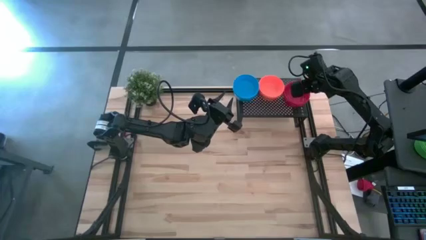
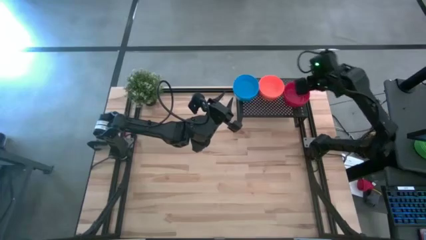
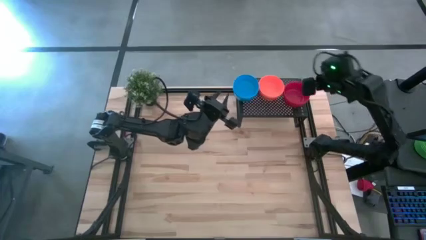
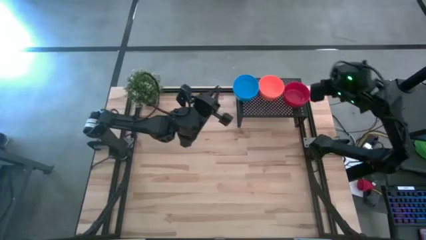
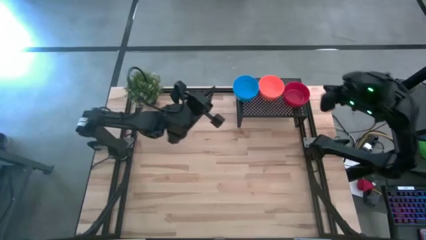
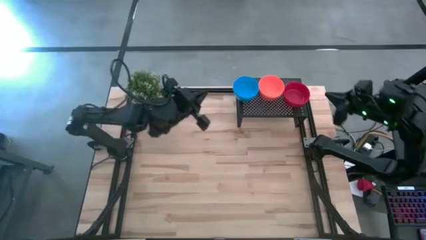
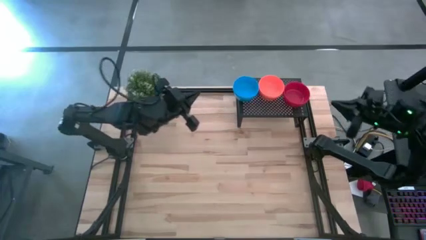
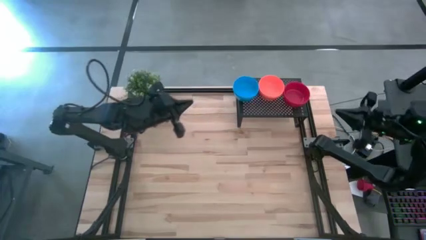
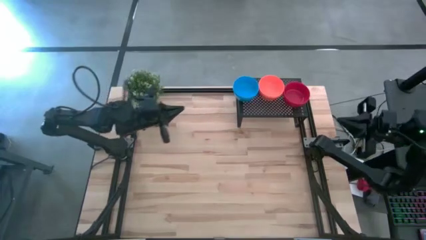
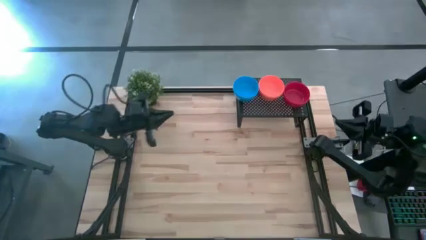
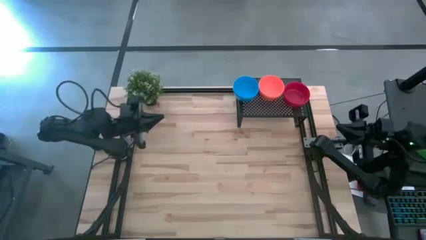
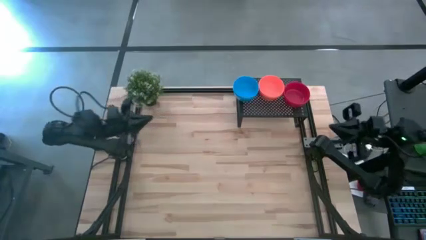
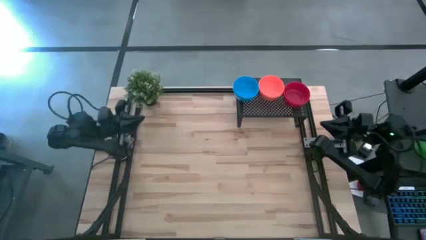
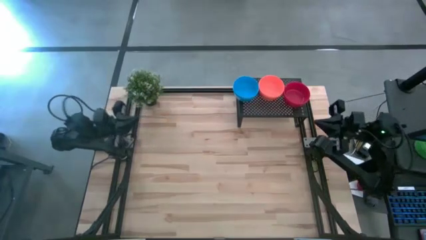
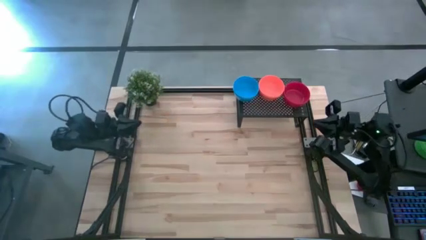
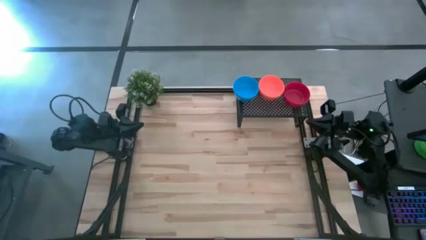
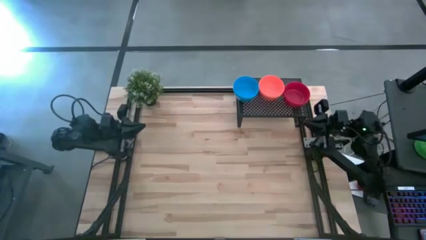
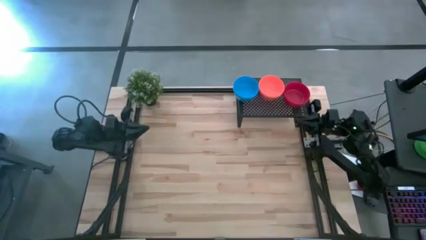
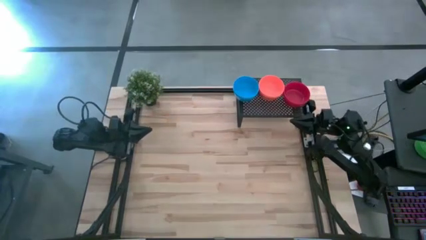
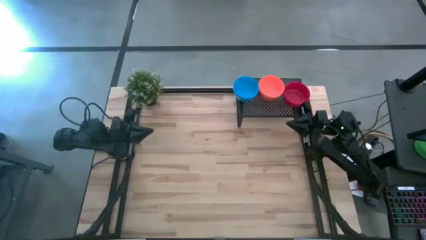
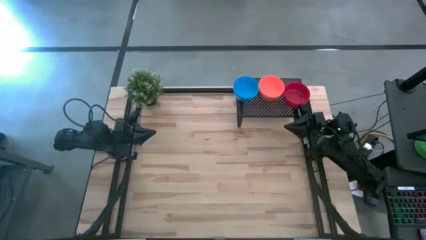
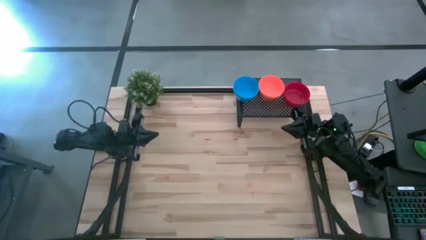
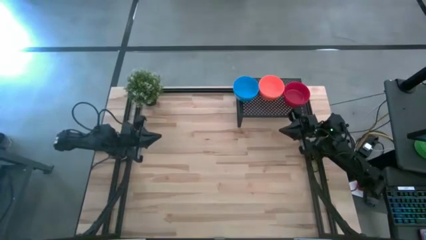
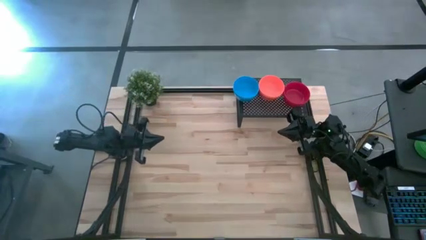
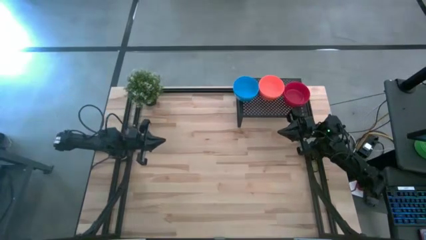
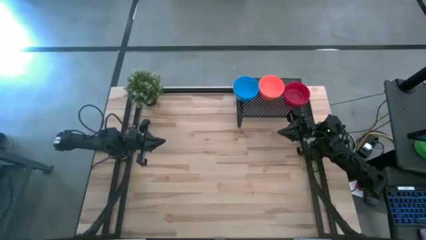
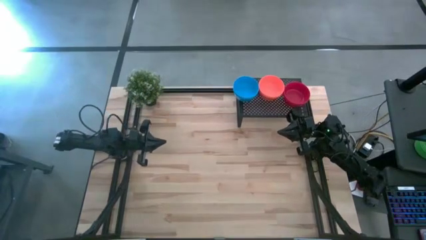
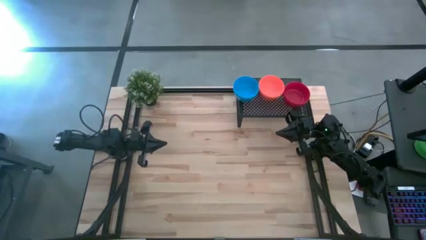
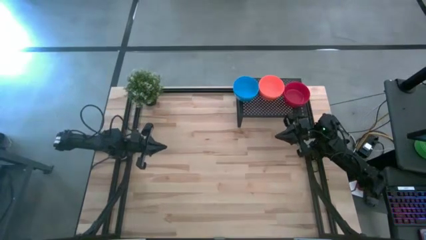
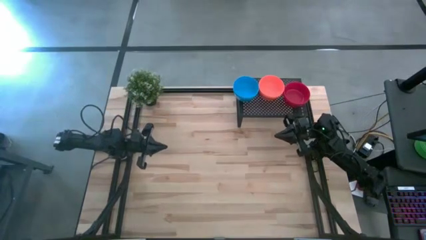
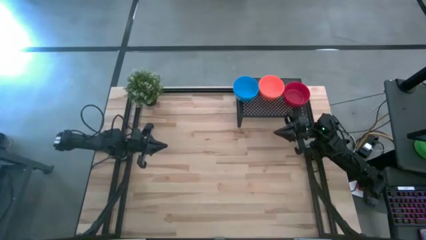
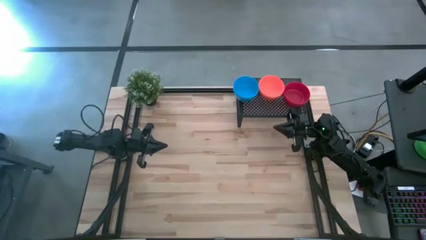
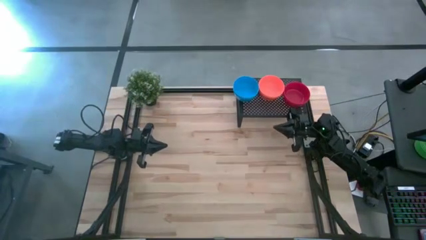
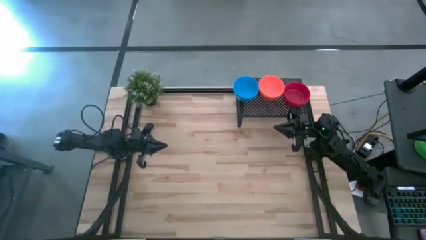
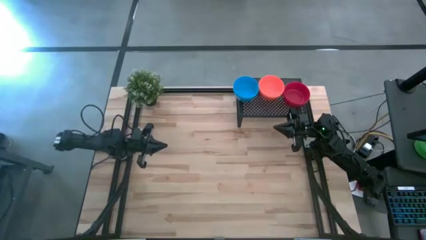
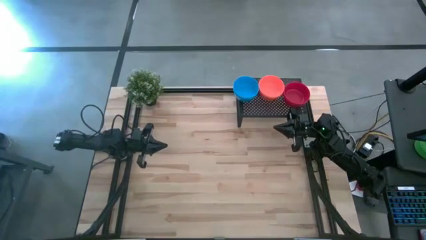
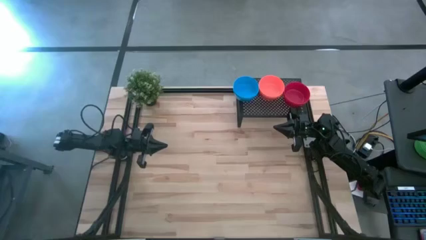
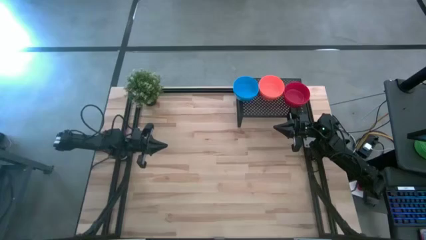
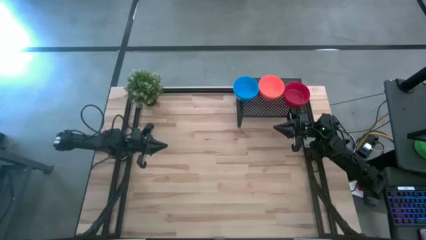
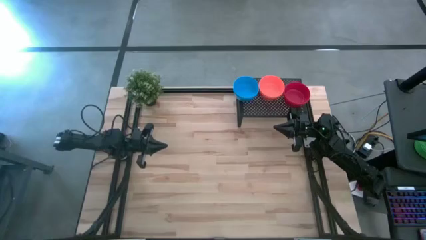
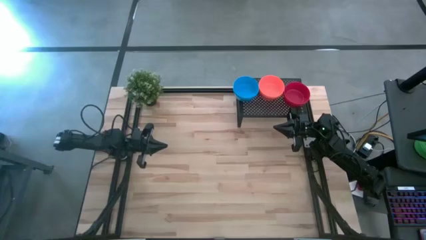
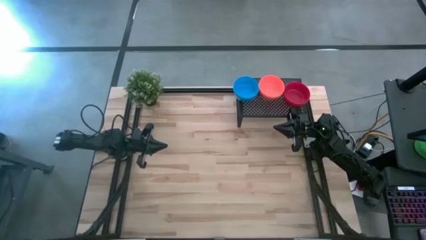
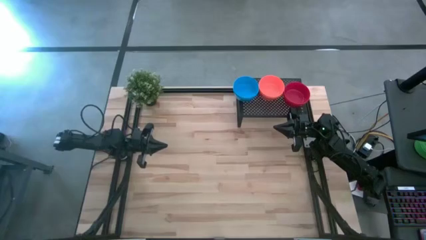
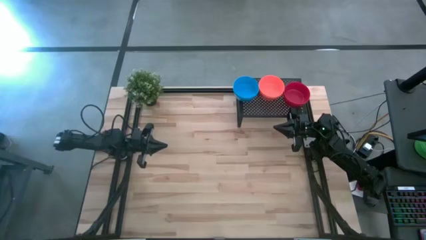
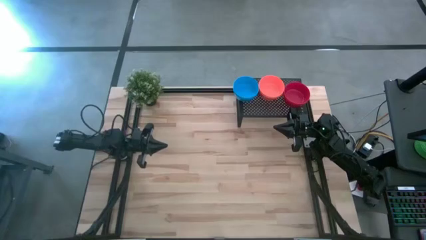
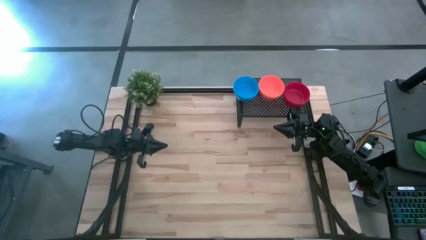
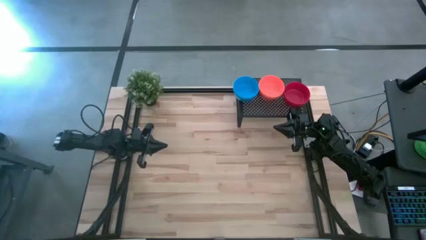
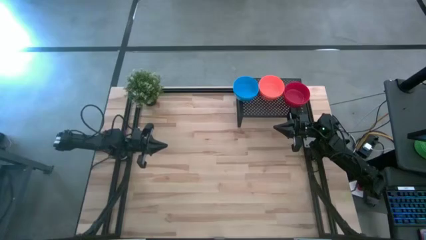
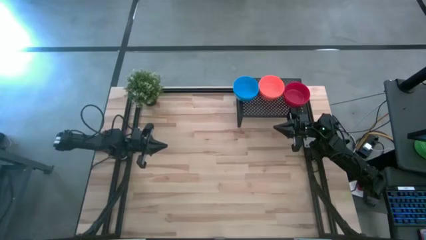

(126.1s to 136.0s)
Task: Pick & Place Mini bowls
Return to Home Position

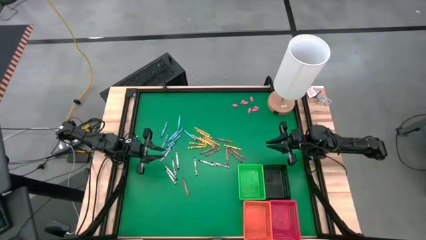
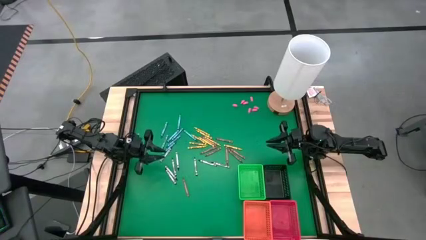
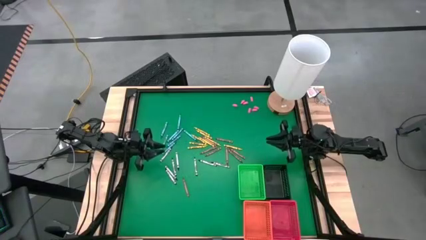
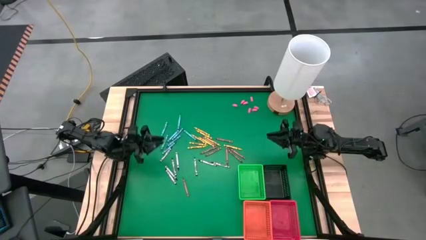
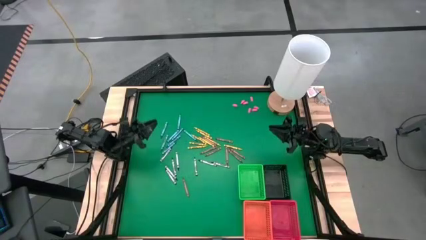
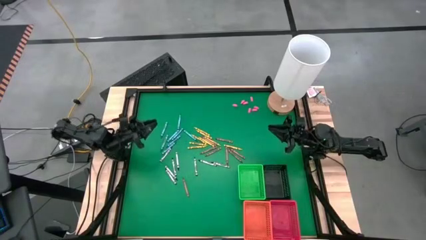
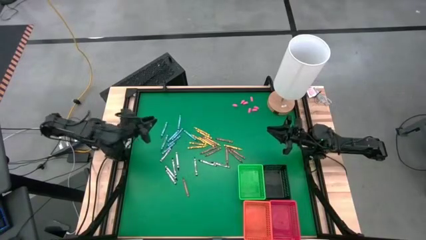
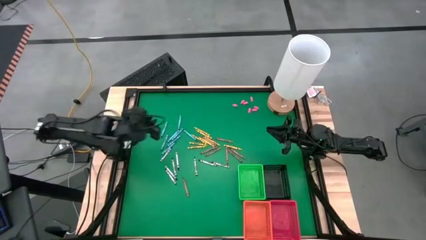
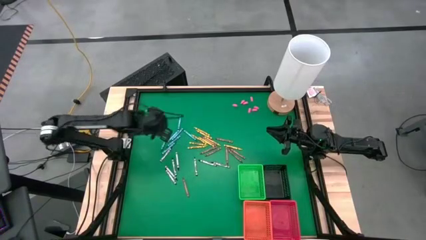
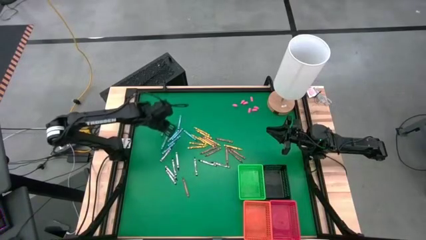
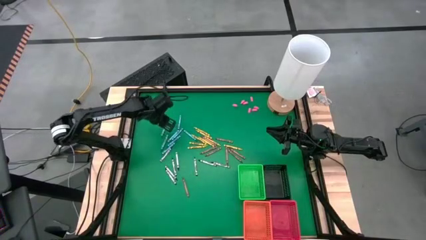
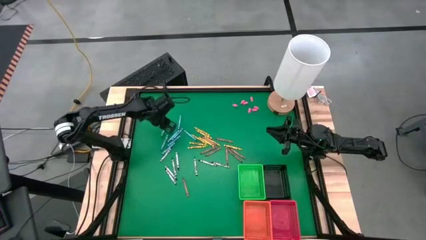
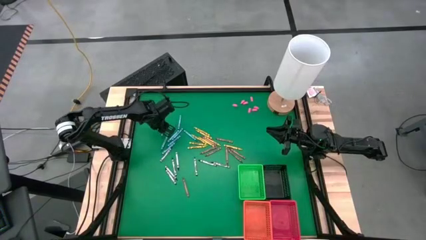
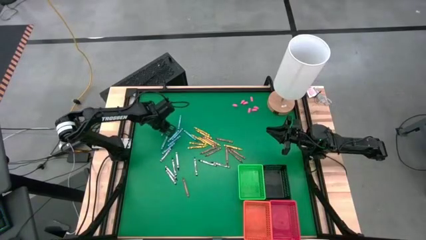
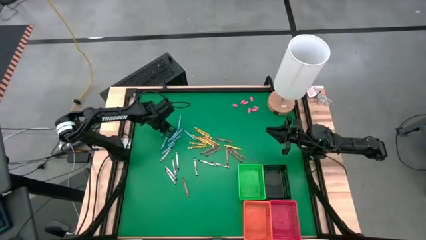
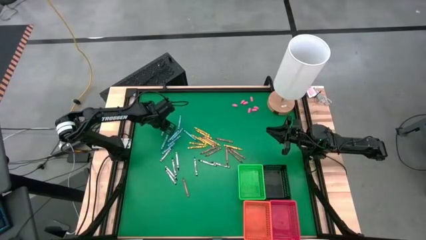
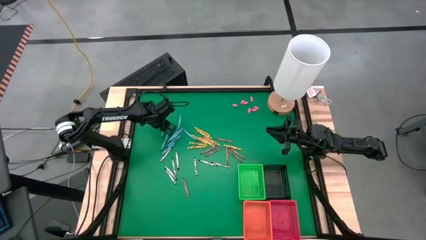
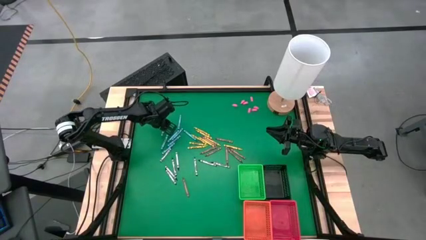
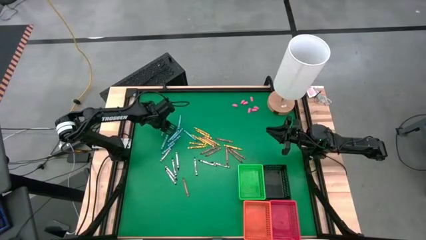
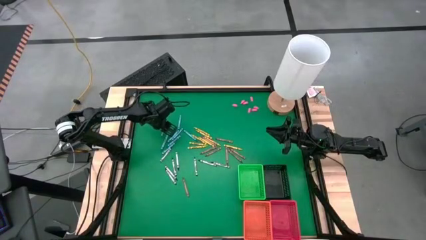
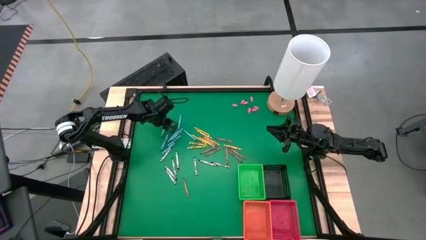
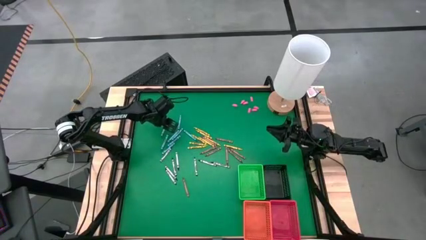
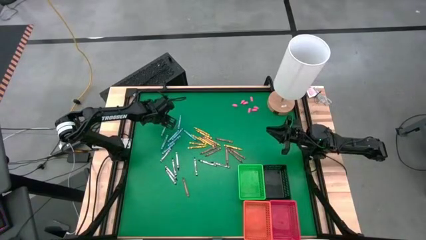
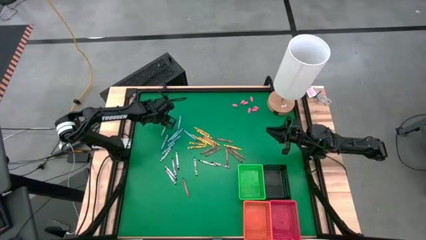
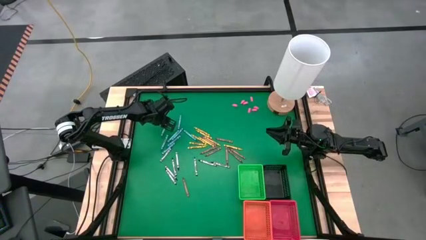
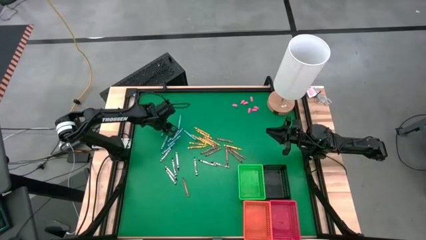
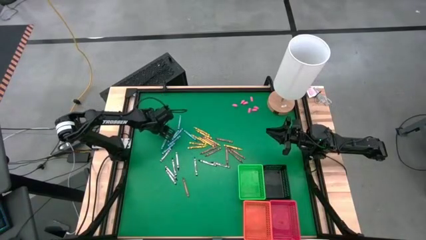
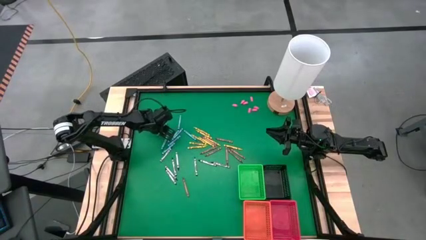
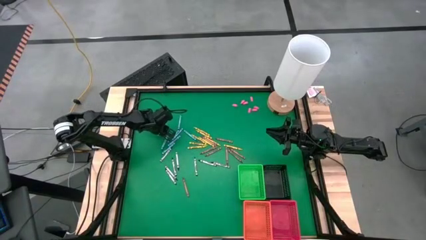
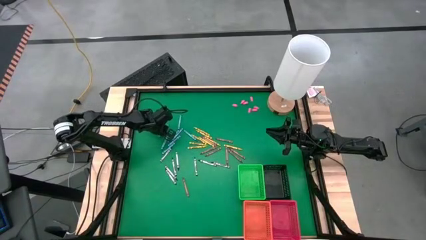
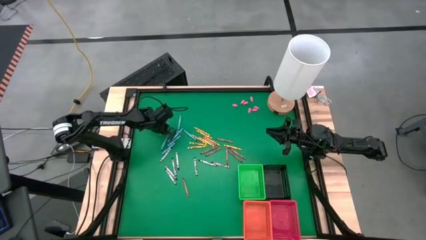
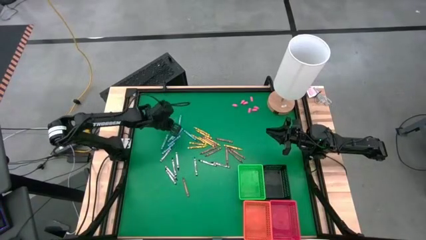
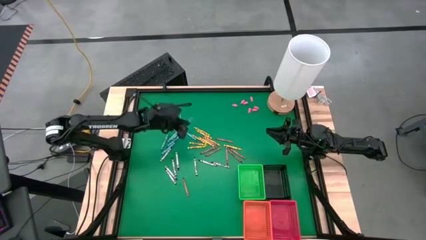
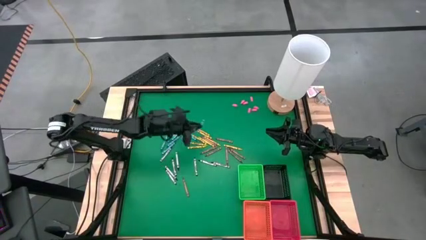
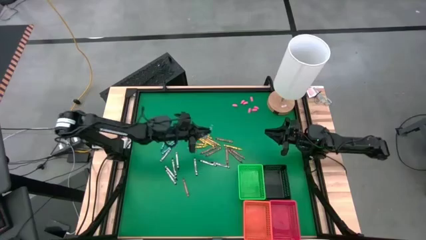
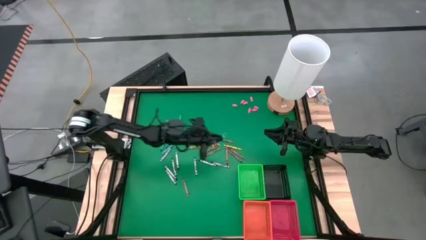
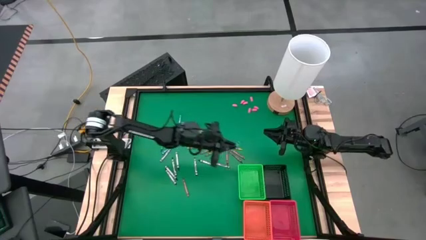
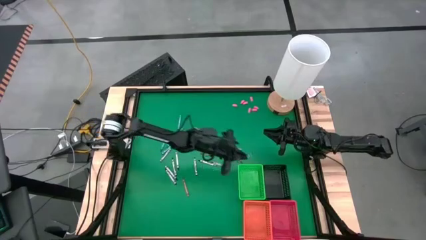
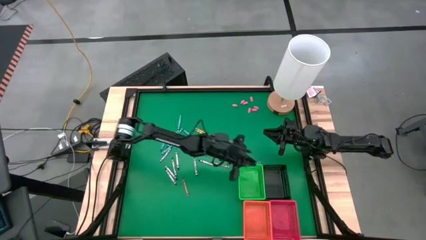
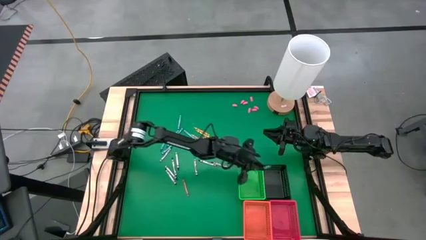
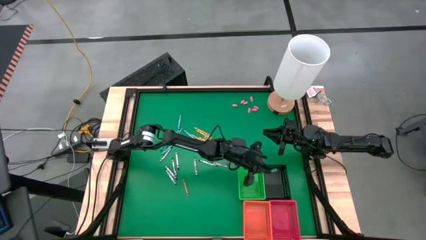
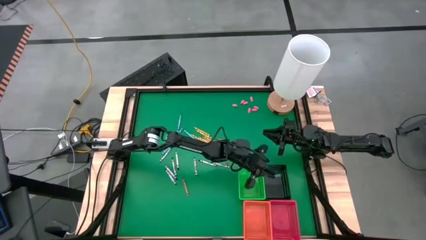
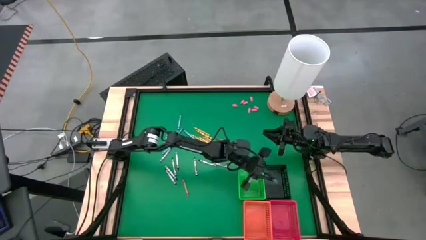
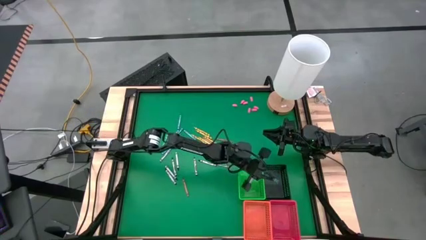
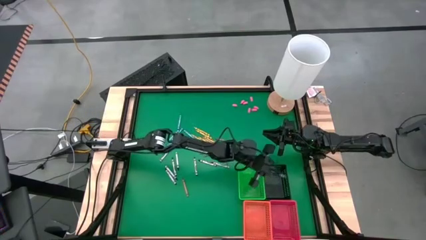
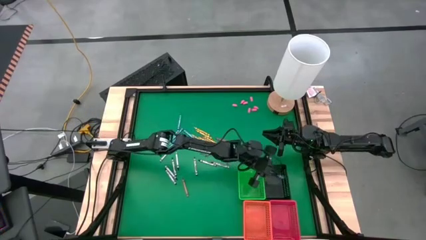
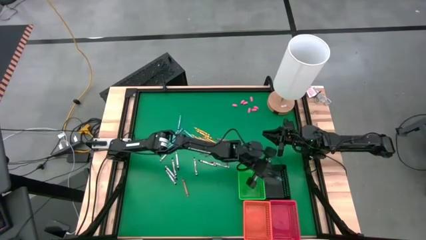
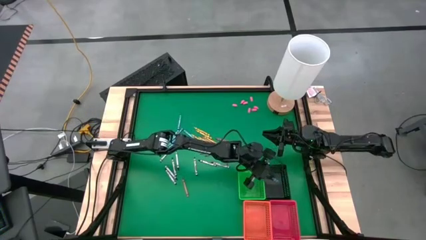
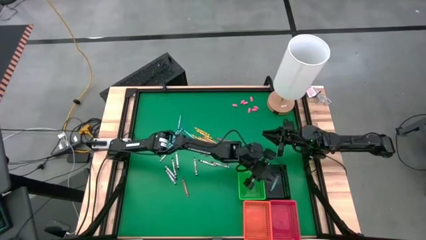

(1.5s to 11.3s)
Task: Sort crayons
Put the blue crayon into the black bin
